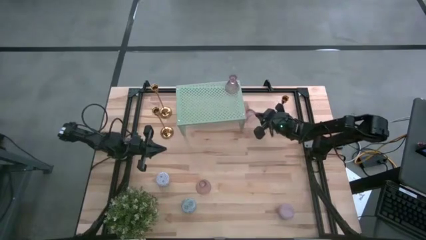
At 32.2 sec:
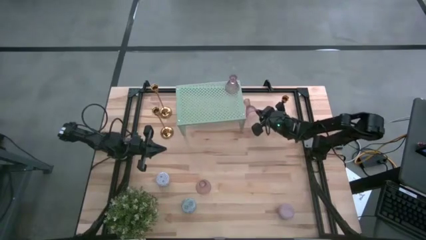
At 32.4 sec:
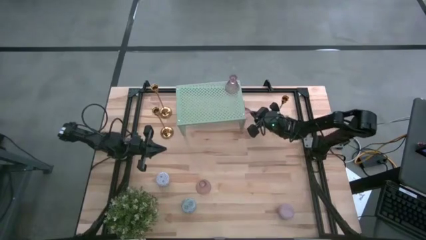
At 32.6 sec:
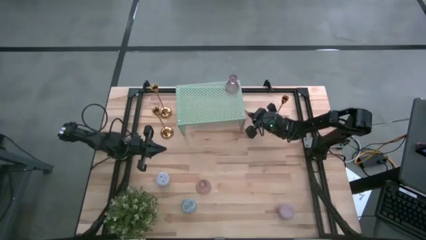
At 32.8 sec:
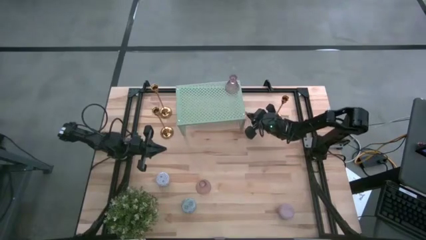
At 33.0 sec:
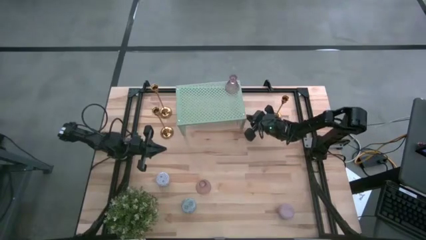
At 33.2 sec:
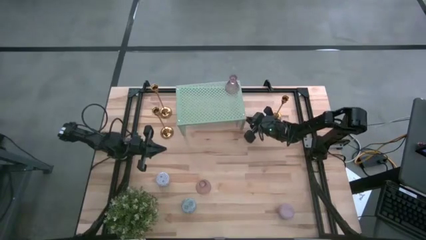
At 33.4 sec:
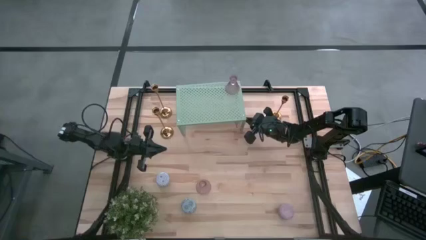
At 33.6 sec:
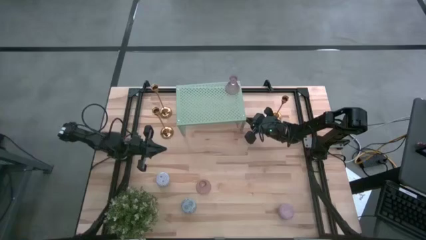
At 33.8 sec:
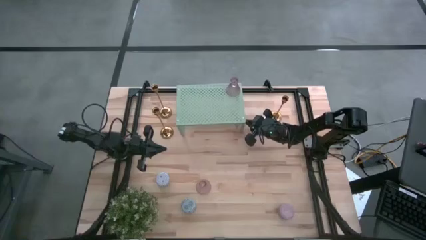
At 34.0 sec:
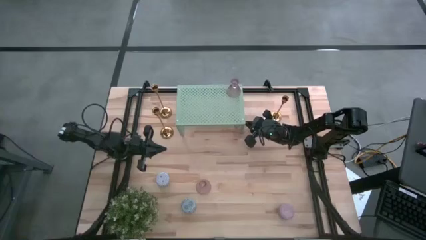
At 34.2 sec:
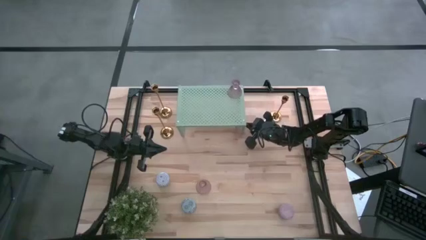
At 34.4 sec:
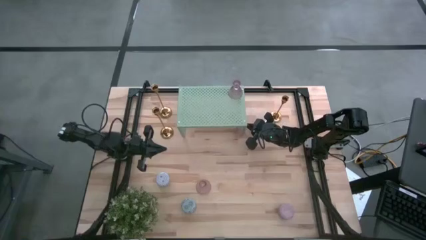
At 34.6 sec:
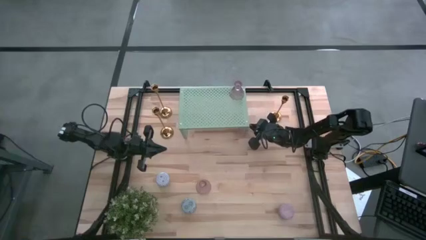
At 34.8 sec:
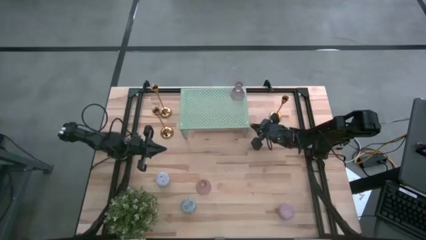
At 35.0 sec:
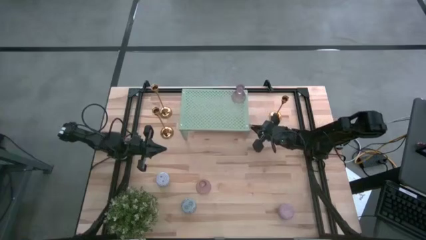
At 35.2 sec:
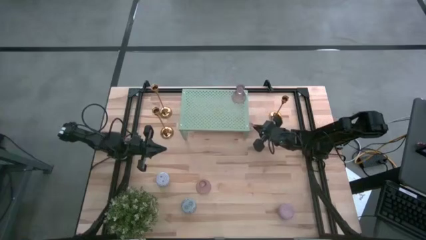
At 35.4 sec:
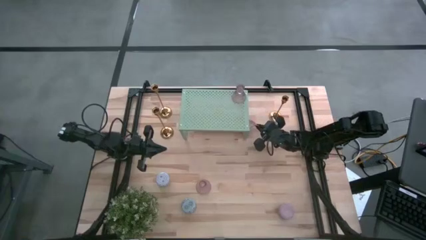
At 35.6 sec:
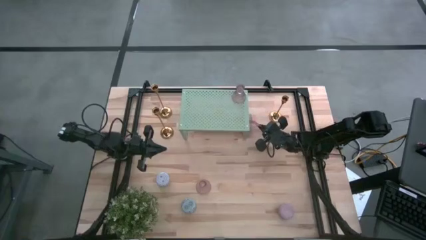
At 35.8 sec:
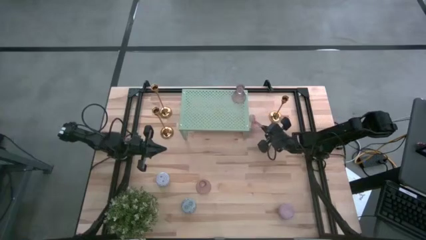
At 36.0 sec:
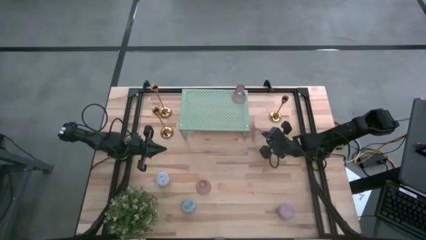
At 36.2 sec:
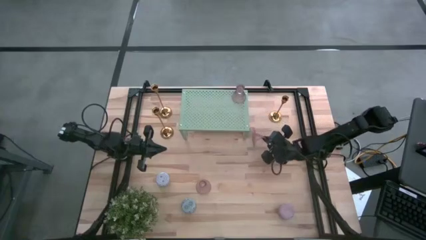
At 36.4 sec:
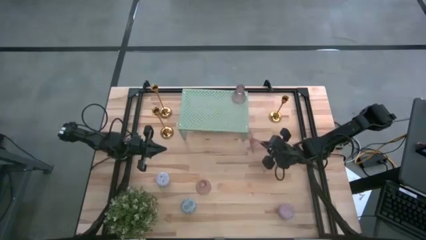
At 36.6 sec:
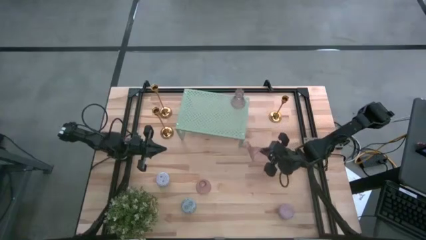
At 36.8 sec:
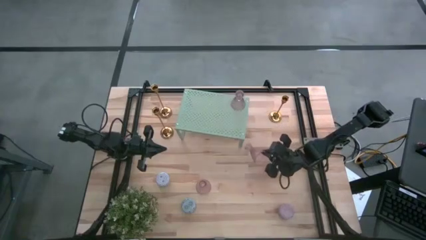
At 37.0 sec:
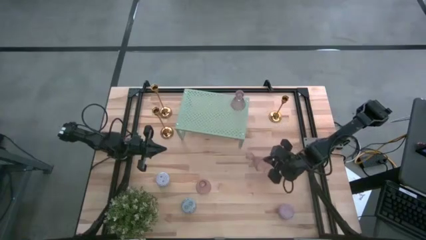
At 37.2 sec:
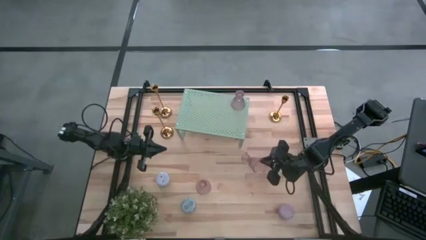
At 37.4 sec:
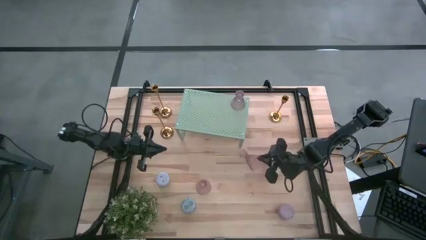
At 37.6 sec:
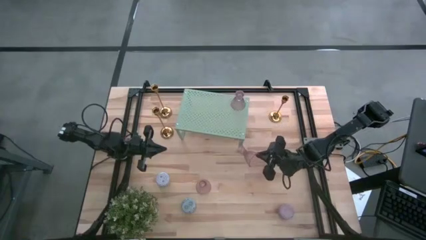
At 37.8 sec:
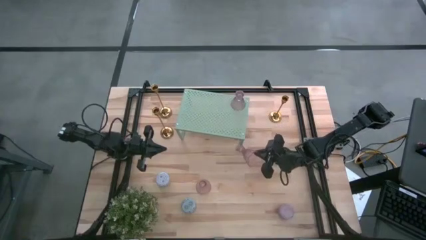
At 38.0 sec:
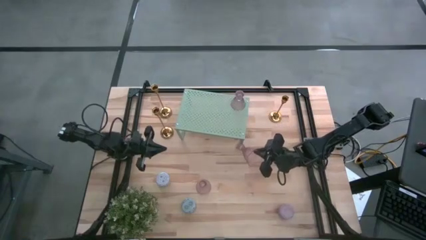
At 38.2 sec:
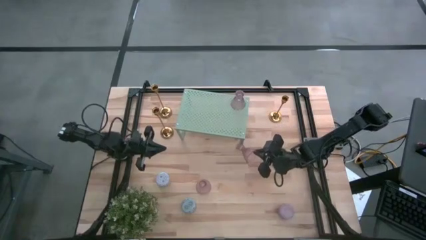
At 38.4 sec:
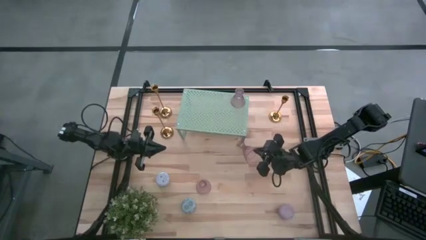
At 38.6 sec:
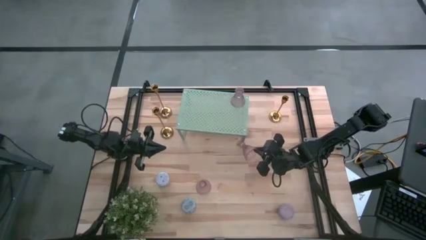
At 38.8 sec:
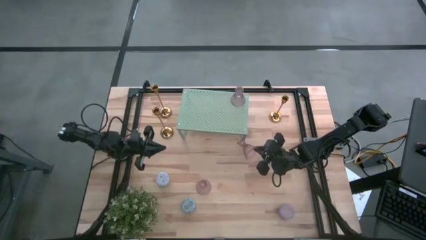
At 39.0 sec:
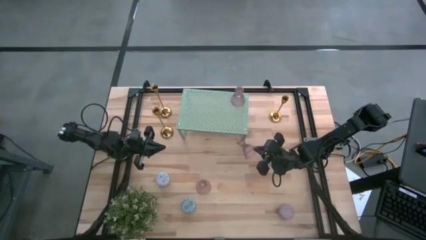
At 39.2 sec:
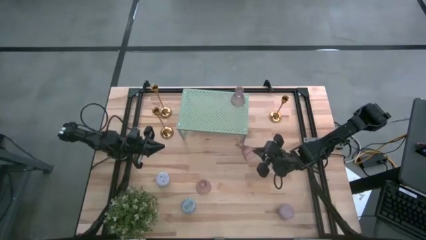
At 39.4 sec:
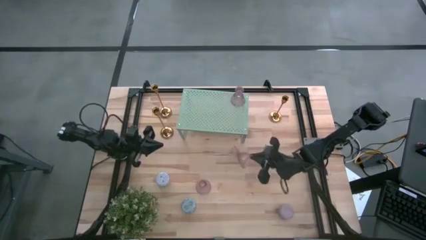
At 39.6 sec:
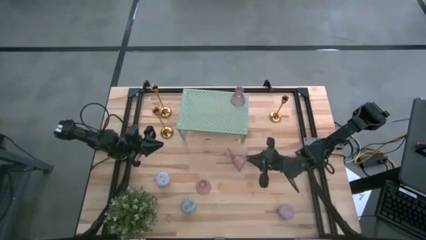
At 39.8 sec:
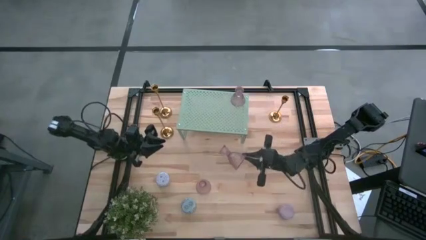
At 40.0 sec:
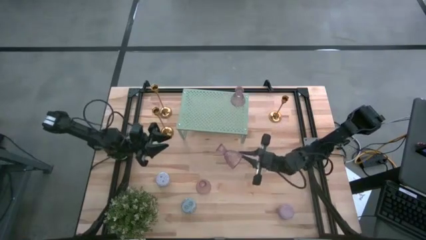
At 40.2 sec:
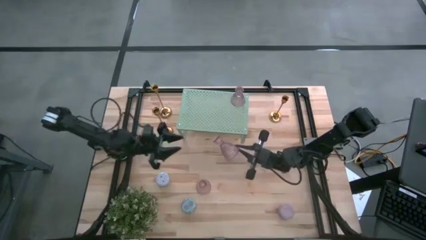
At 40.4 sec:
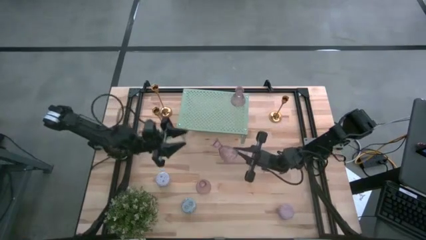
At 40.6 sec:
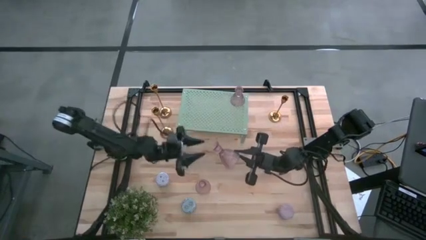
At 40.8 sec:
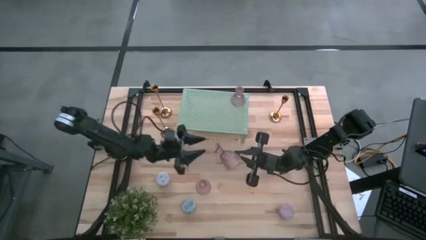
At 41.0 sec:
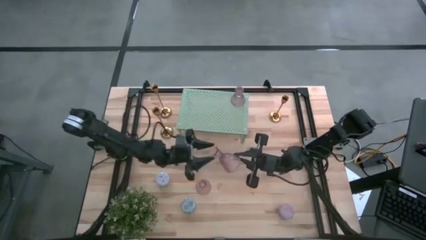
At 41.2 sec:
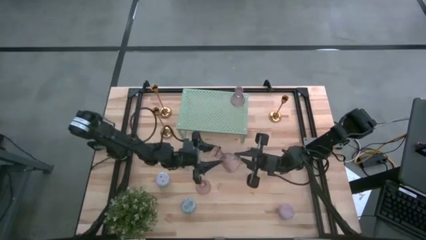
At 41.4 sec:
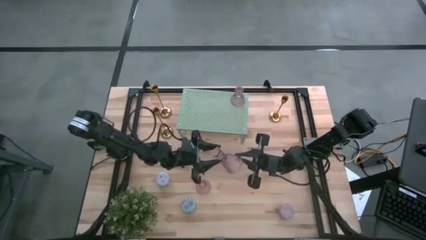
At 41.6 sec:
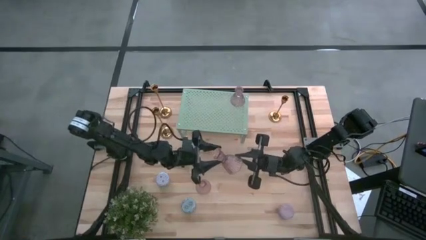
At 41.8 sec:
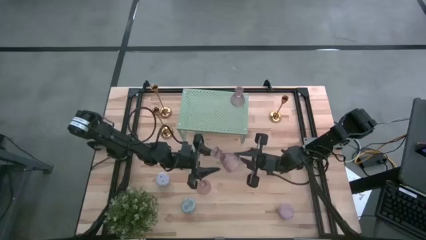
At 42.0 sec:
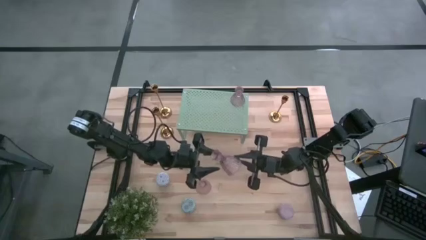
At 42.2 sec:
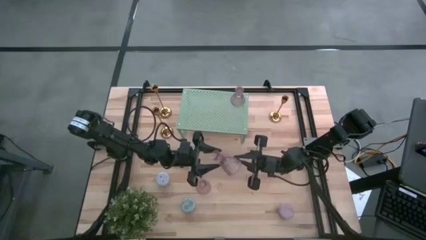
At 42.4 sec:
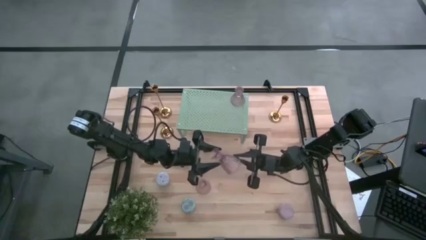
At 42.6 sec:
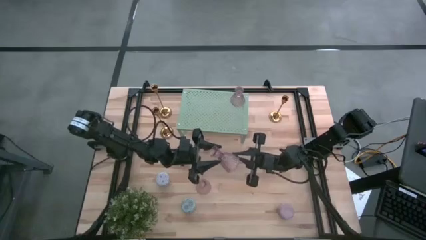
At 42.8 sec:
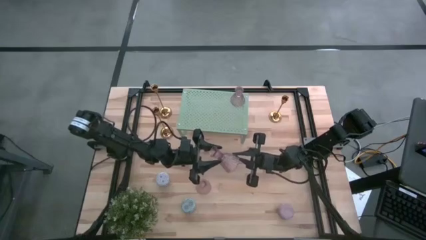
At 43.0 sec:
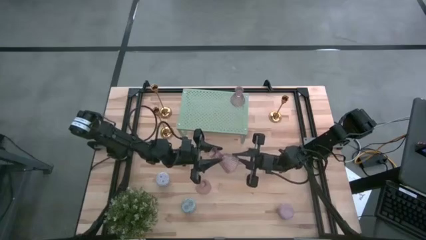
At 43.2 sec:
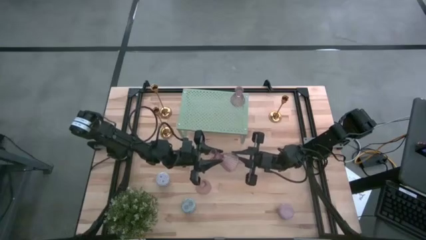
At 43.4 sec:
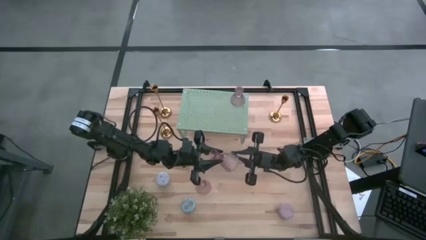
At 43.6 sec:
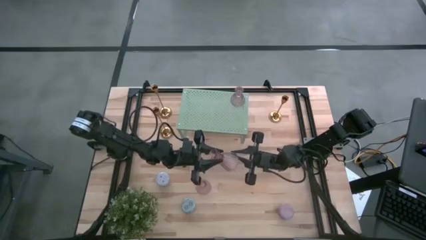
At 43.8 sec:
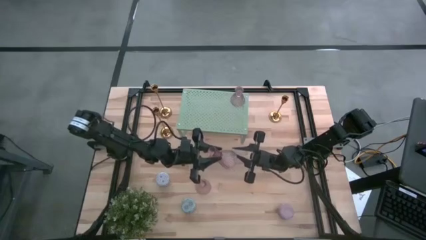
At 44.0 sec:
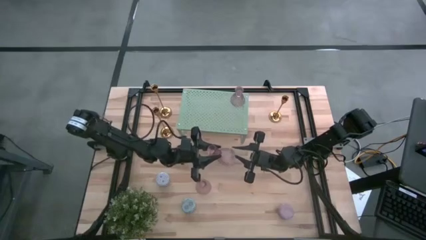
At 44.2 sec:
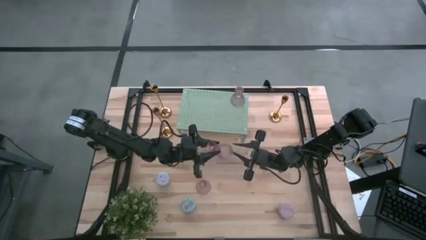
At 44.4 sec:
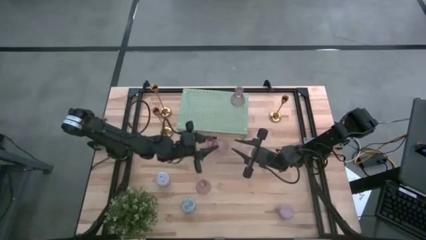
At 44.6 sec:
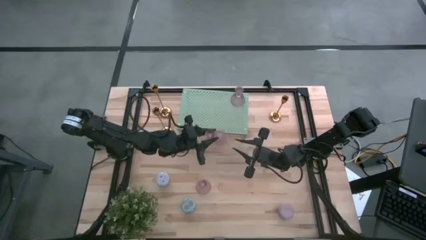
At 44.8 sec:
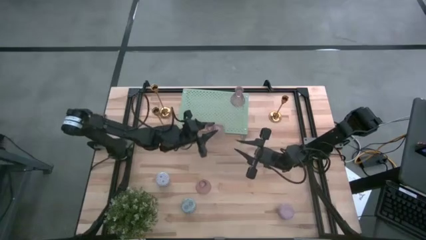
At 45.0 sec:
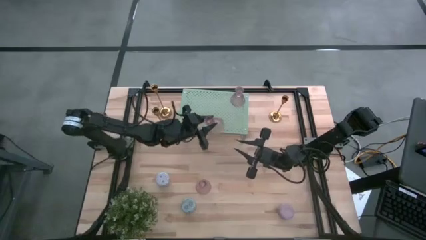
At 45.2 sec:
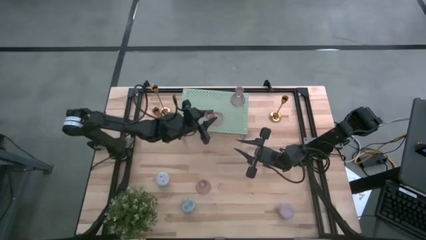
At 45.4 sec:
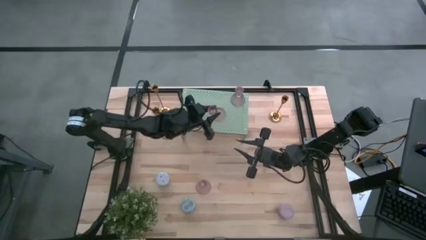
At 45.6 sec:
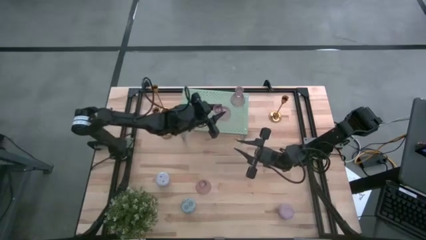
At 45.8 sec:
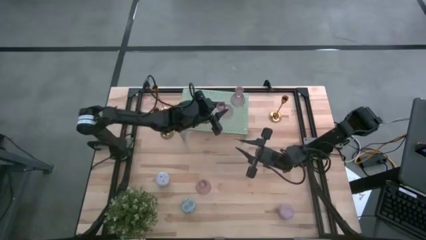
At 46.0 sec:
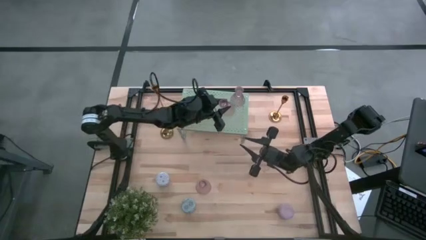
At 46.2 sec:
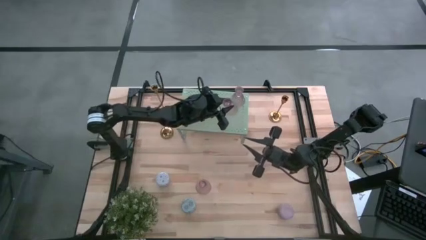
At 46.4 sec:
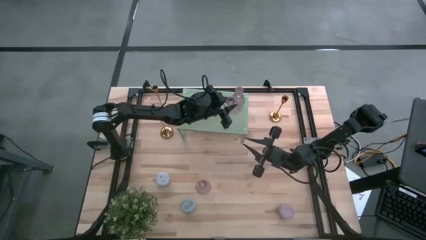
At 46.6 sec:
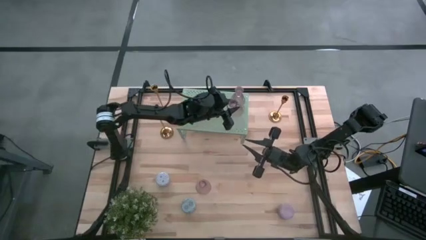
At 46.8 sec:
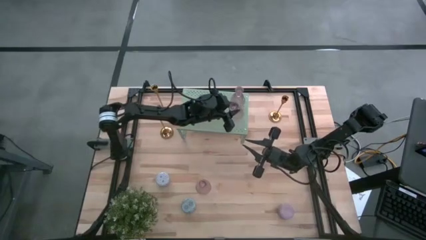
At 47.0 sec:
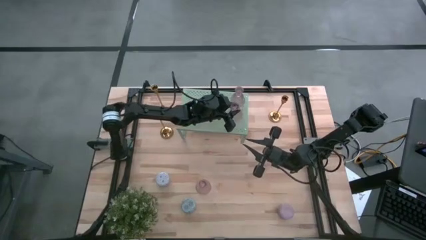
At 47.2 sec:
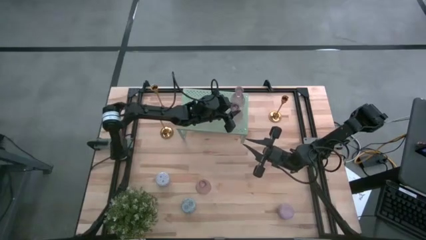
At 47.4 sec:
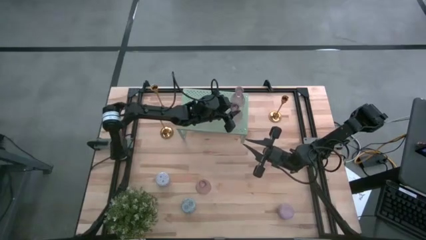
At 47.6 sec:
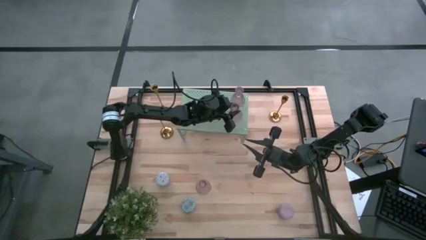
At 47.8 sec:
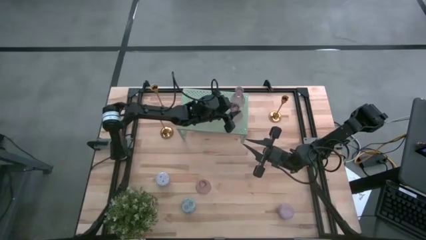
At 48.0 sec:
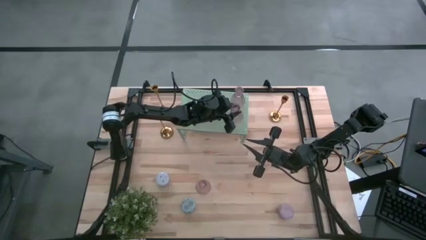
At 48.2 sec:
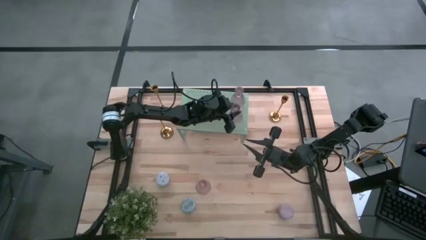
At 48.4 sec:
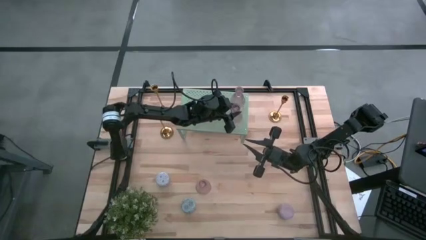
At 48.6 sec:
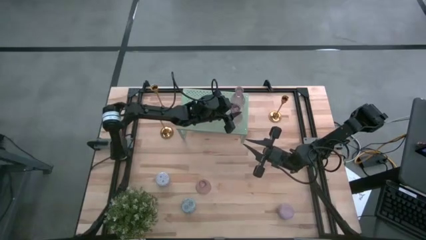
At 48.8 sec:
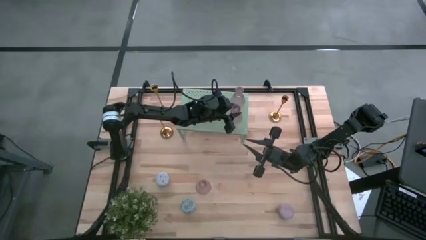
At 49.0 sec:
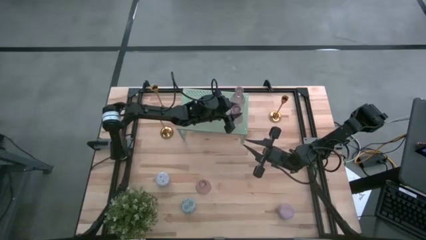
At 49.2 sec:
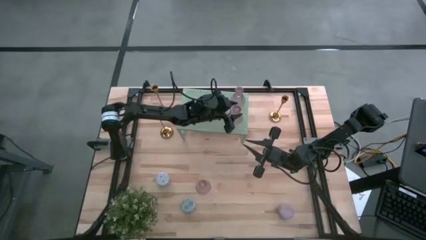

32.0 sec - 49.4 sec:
Task: Pick & Place candle stick holders
Put the top glass candle holder on the shelf aligned with the other glass candle holder
